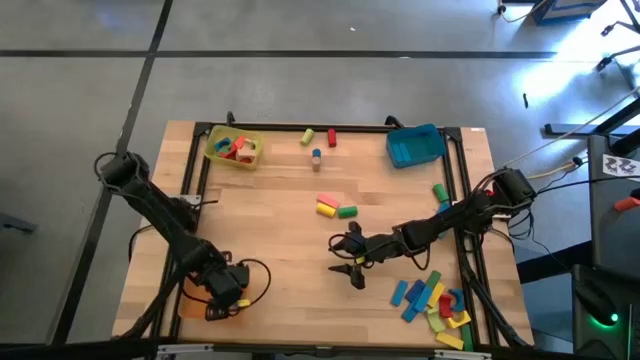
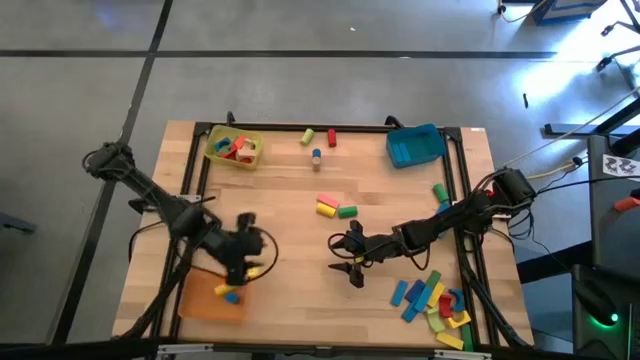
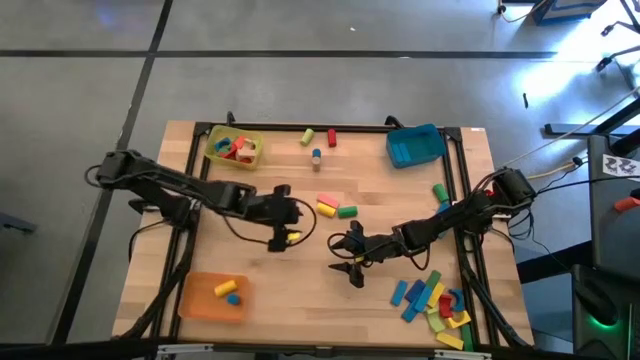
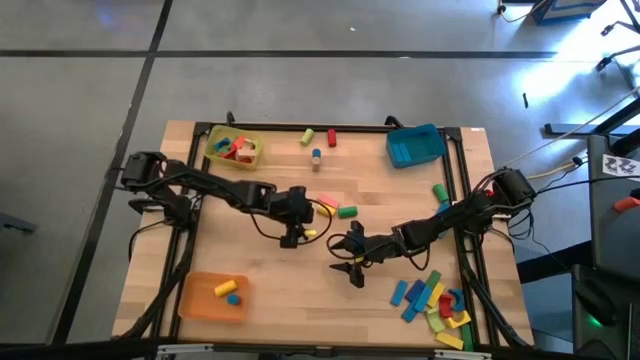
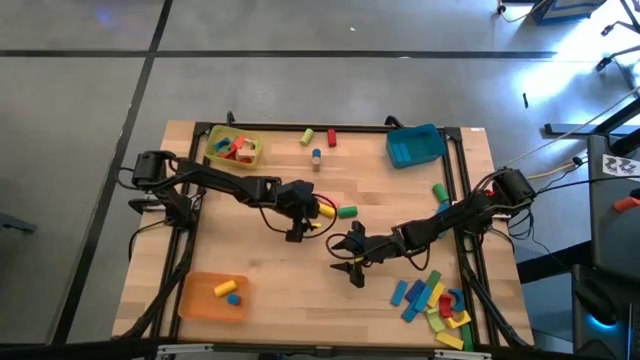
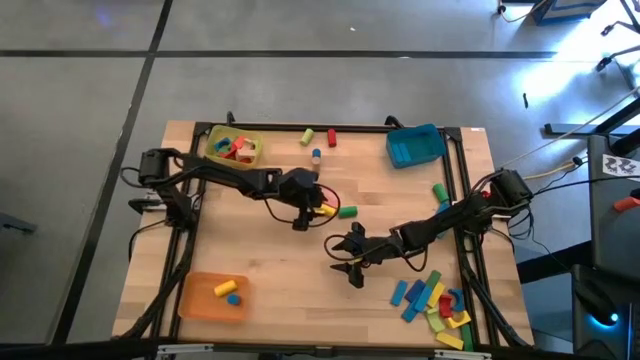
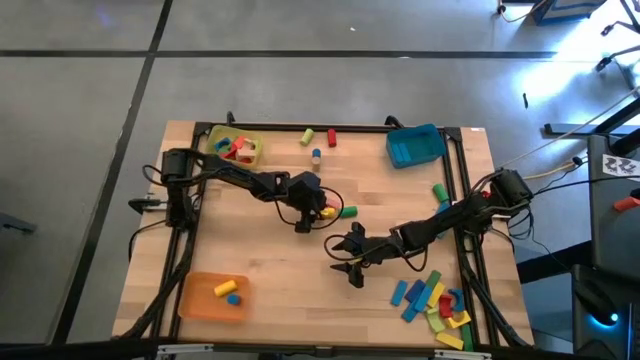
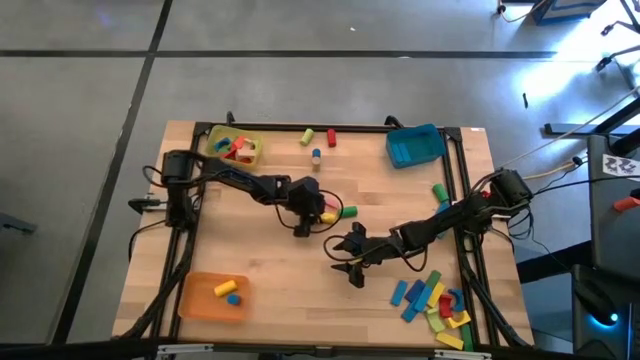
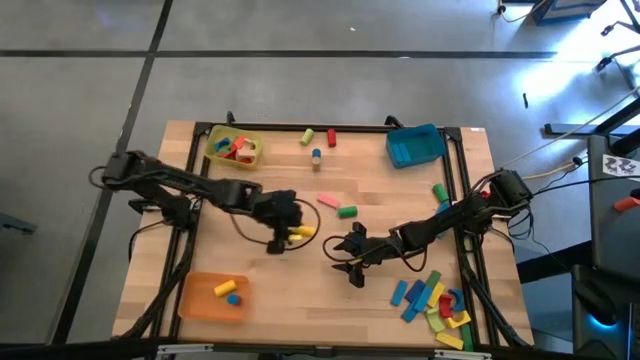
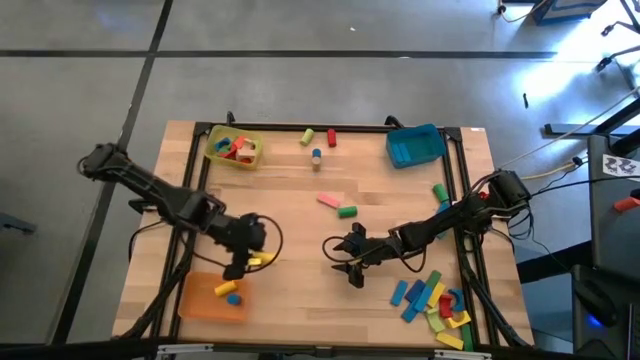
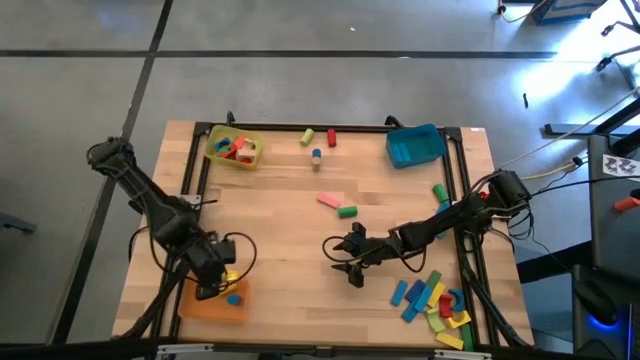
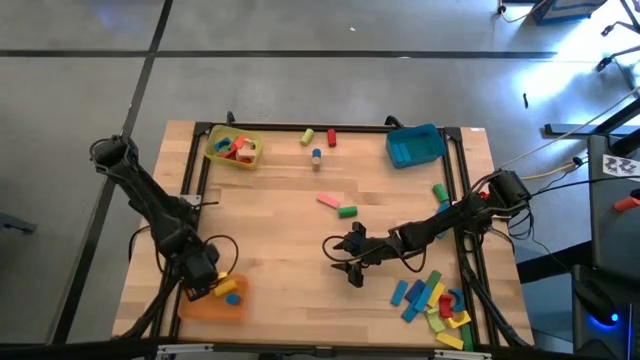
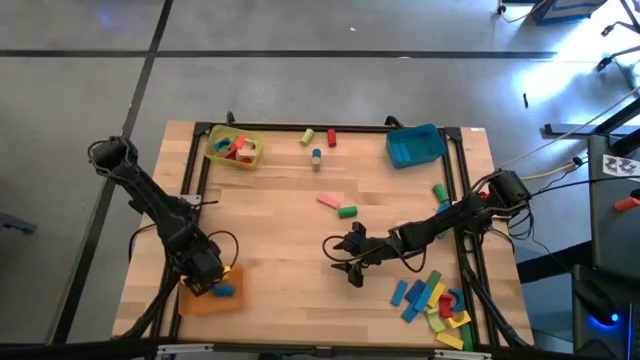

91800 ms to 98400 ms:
Task: Sort blocks by size
Put the yellow cylindrical block into the light orange bin

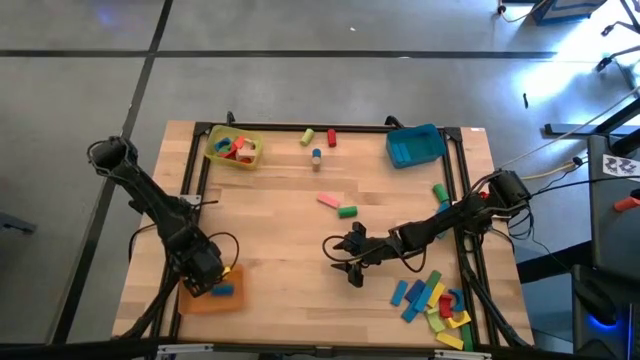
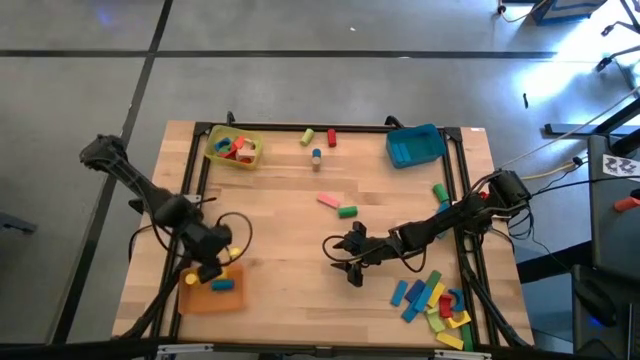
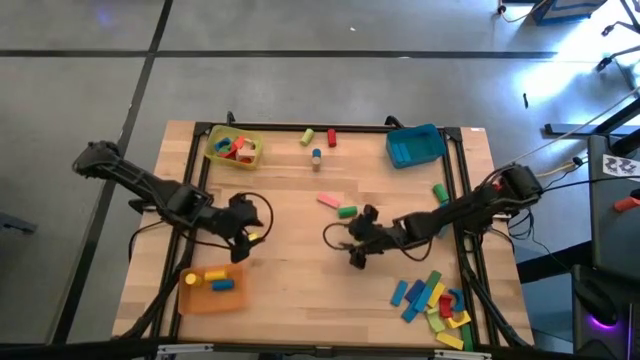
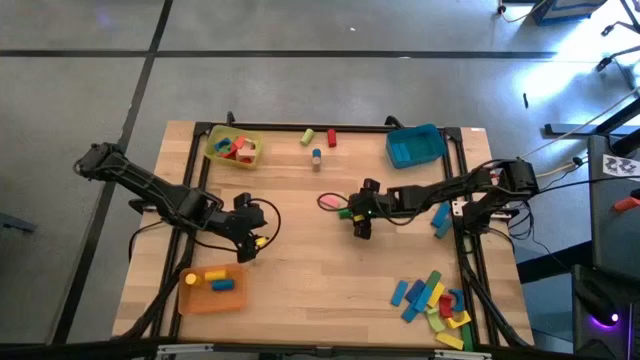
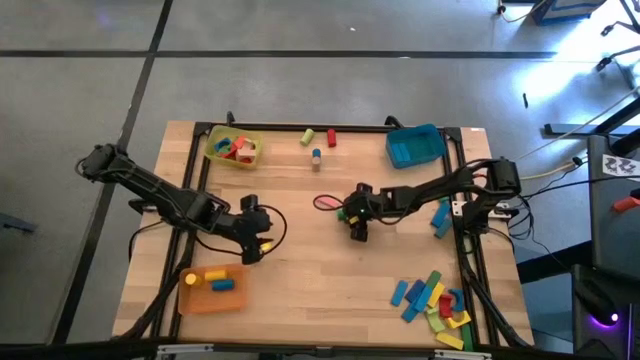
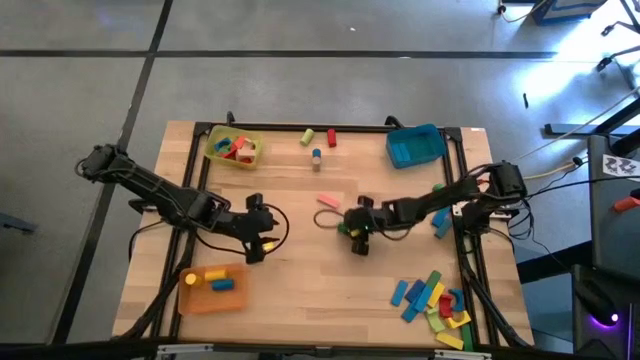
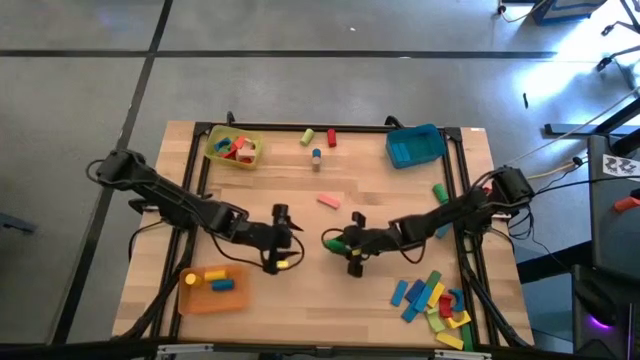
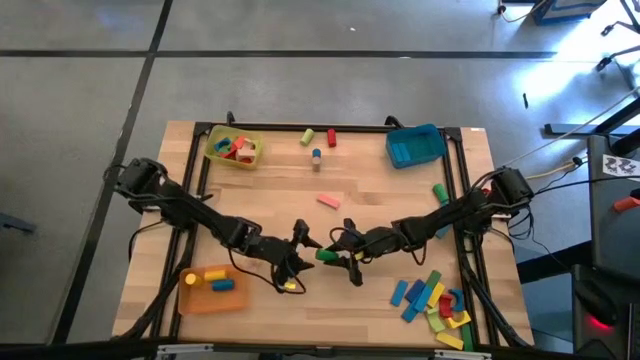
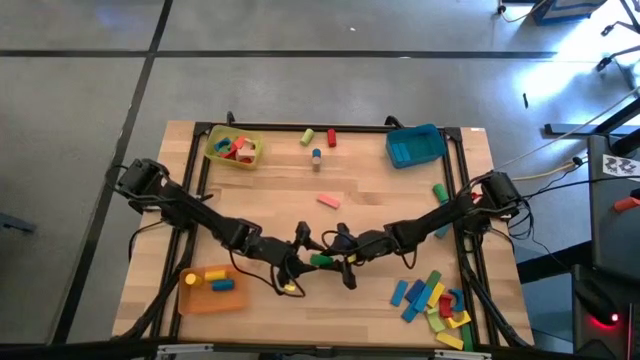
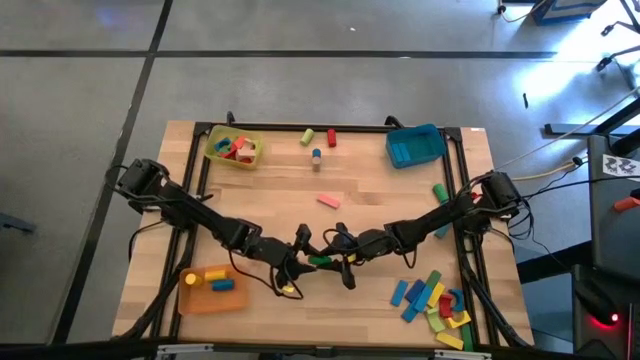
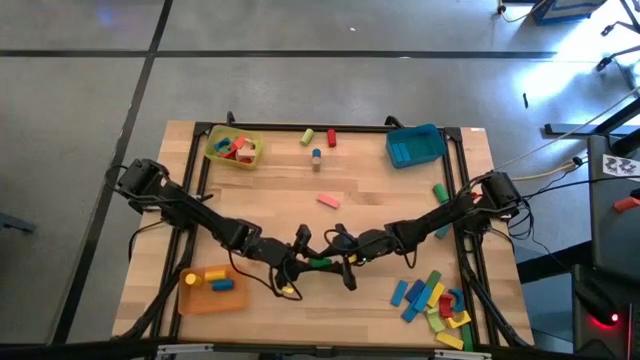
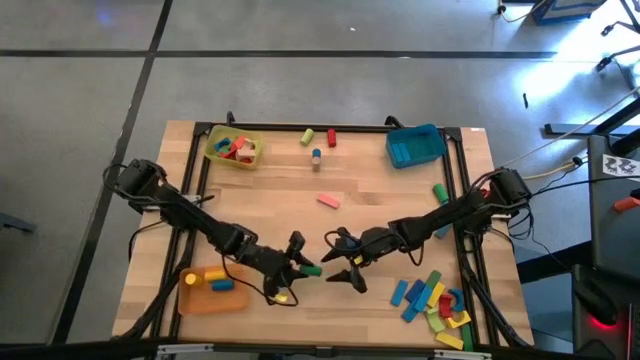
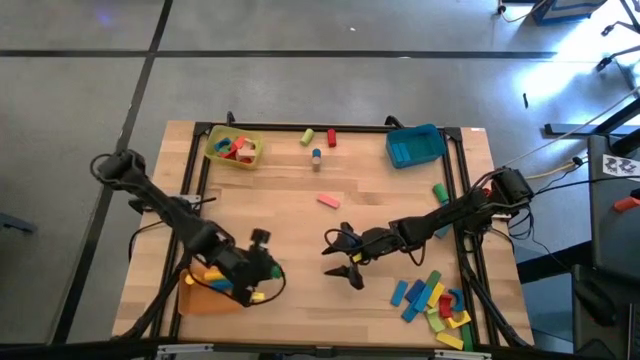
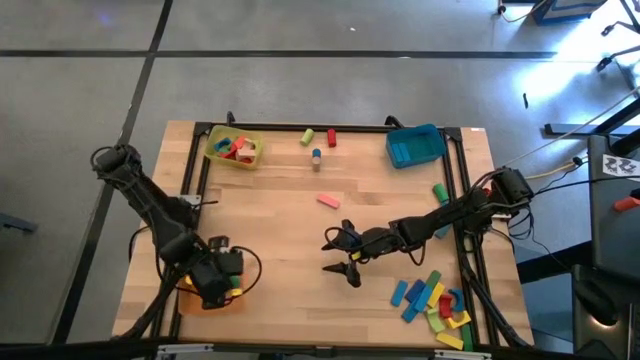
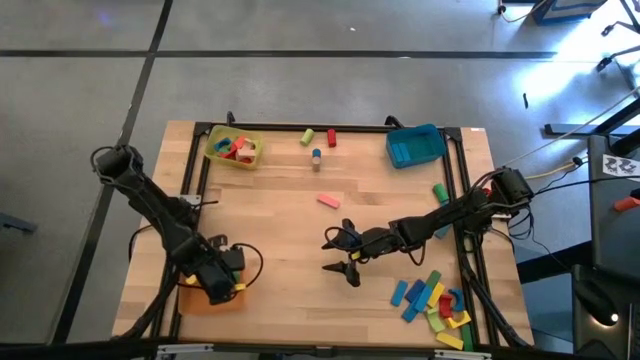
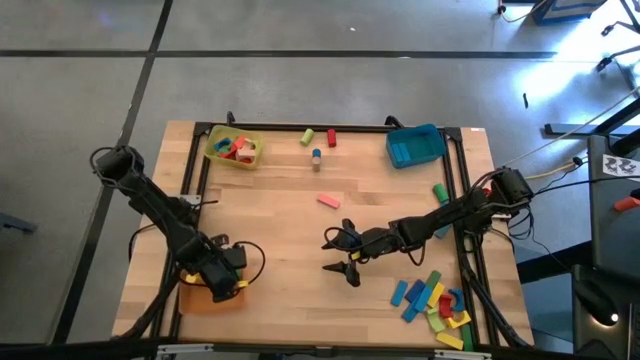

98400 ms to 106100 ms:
Put the green cylindrical block into the light orange bin

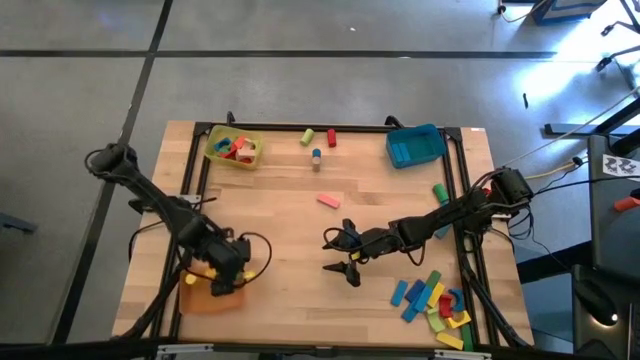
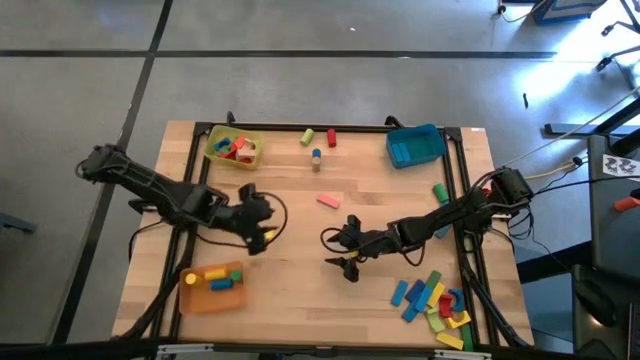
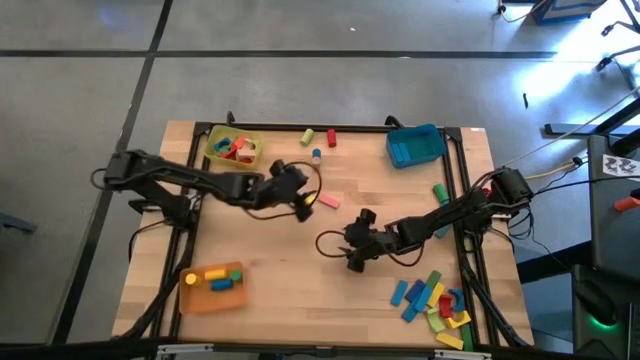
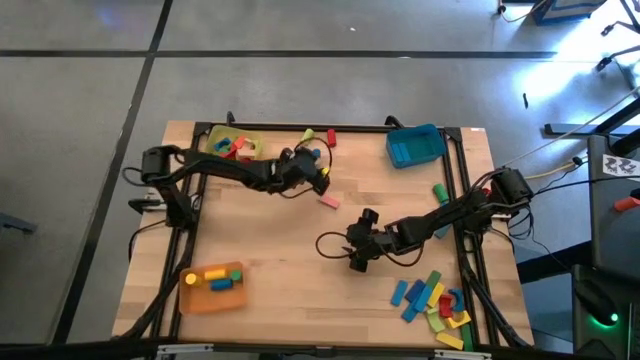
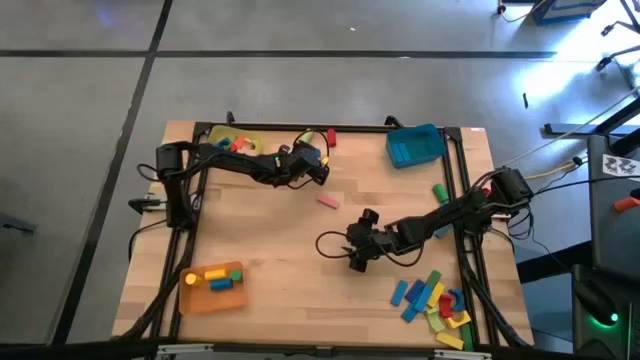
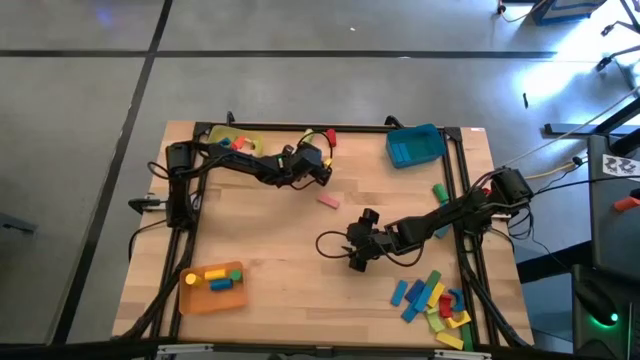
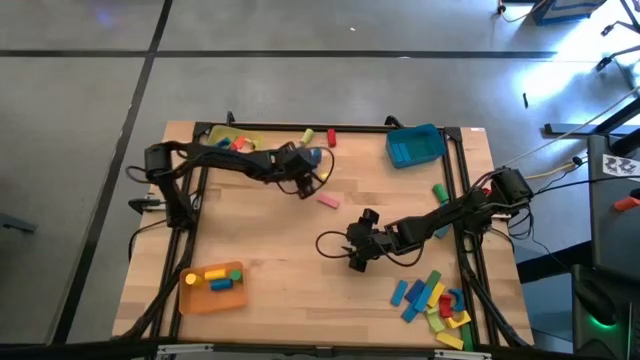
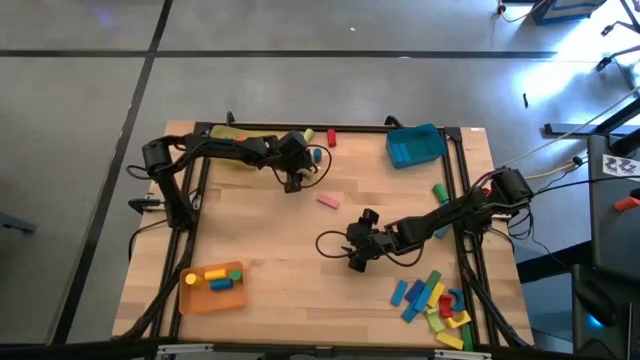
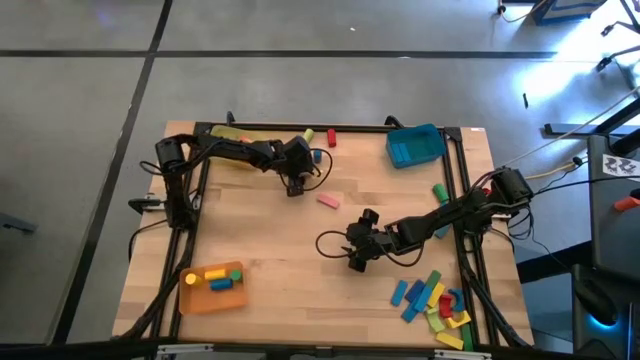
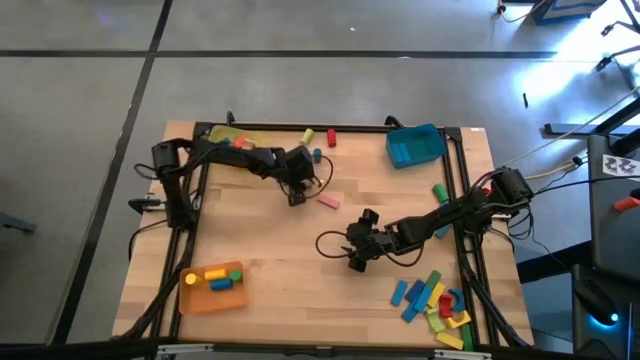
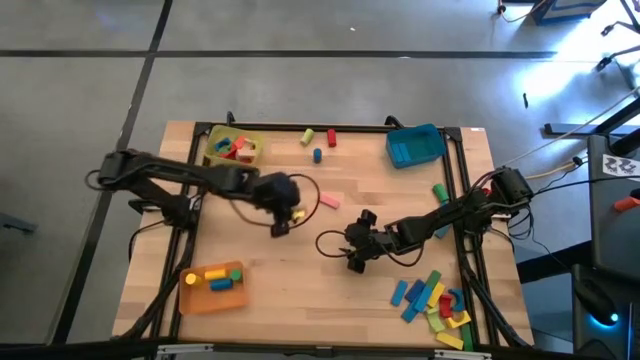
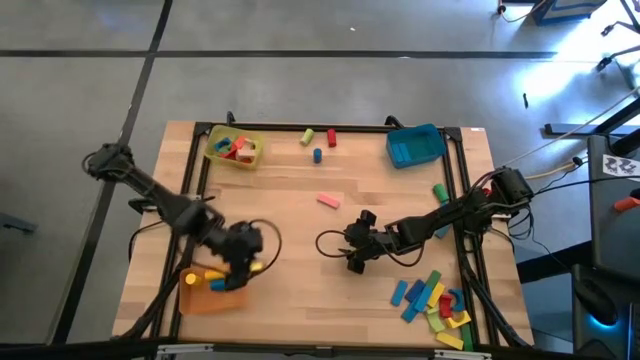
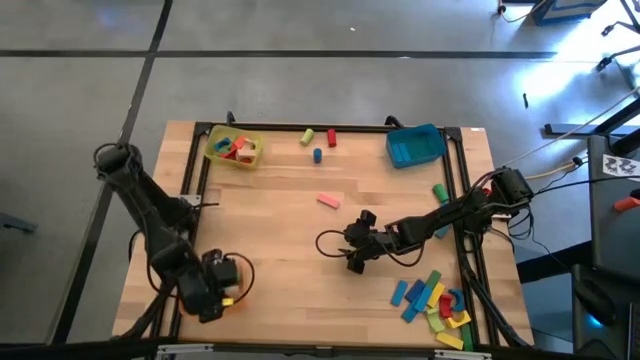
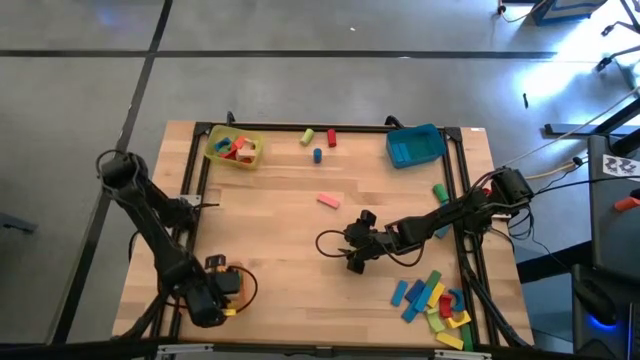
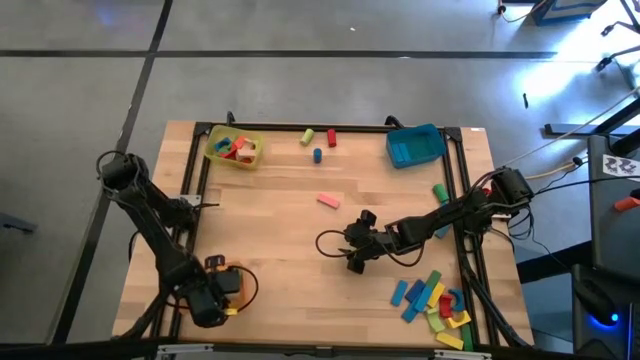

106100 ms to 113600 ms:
Put the gray cylindrical block into the light orange bin
